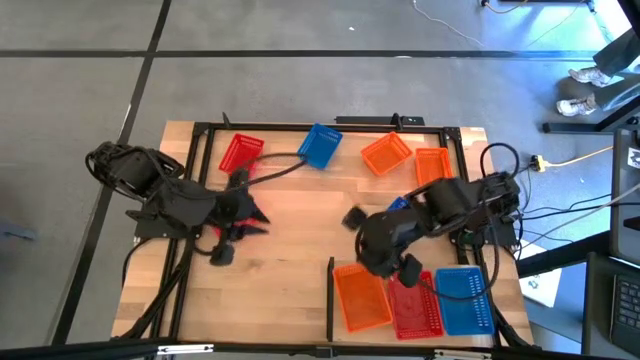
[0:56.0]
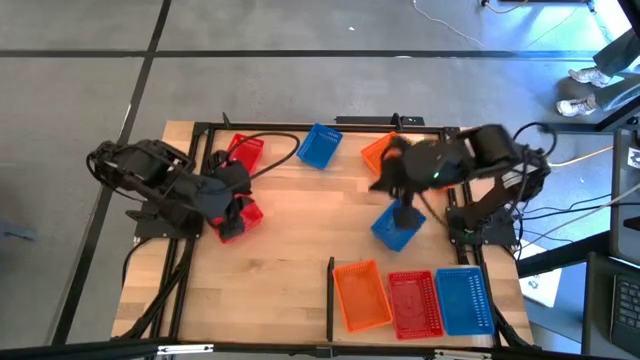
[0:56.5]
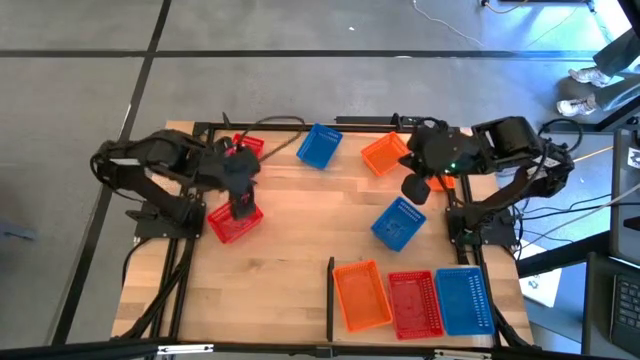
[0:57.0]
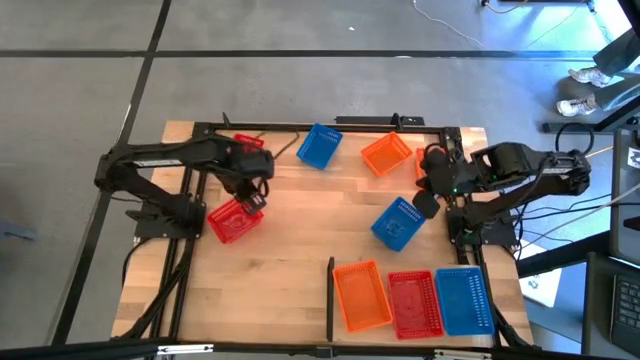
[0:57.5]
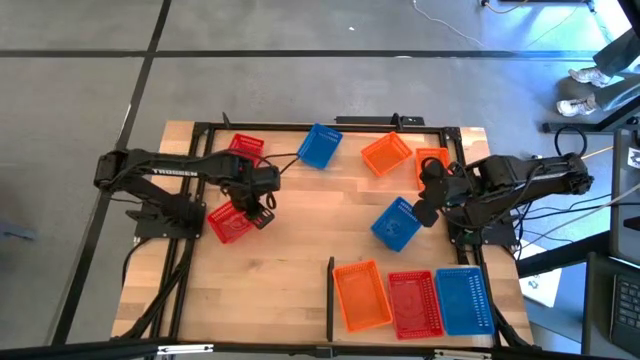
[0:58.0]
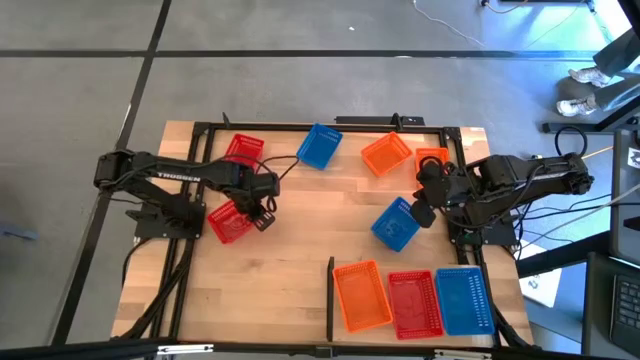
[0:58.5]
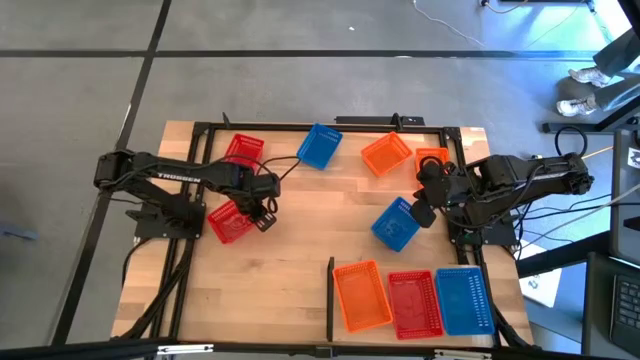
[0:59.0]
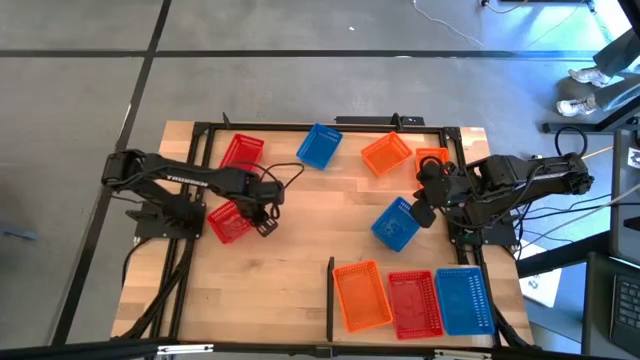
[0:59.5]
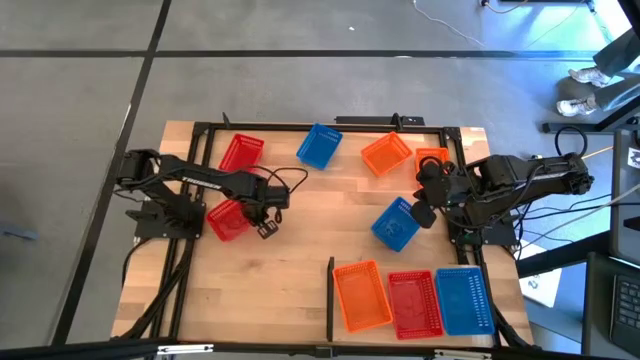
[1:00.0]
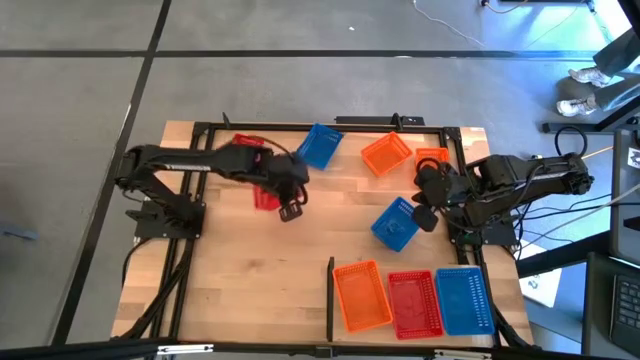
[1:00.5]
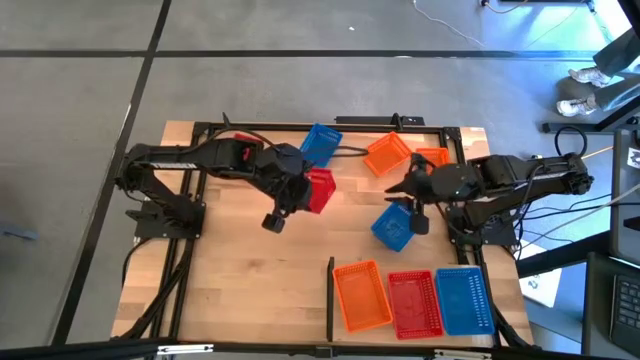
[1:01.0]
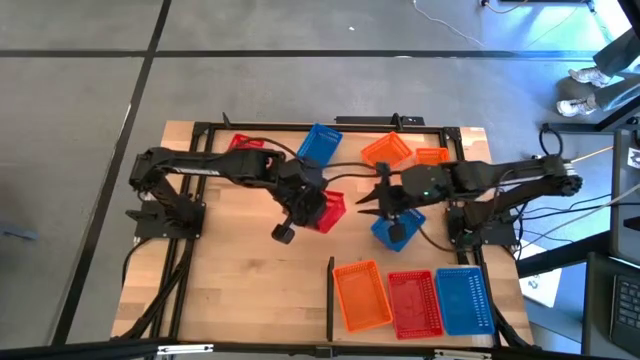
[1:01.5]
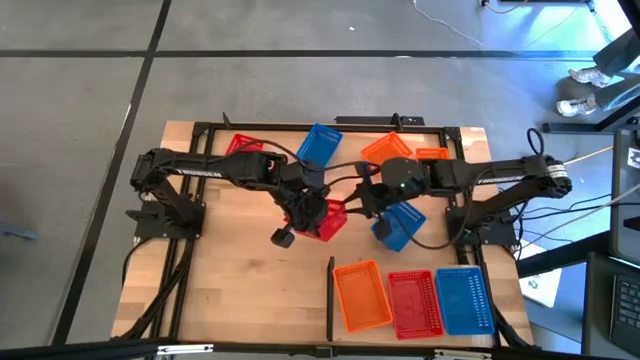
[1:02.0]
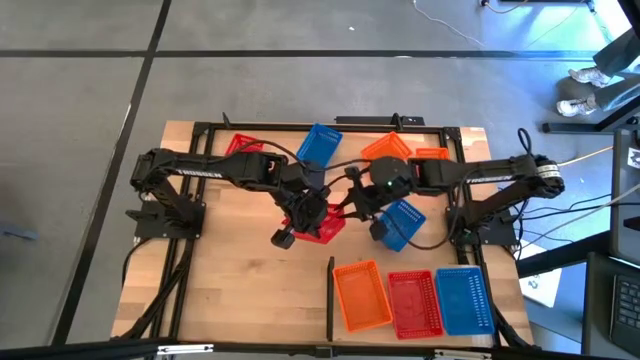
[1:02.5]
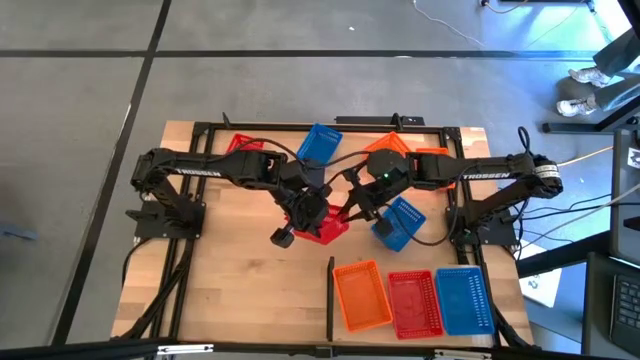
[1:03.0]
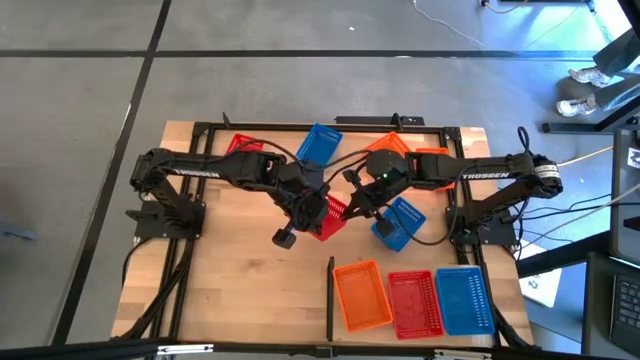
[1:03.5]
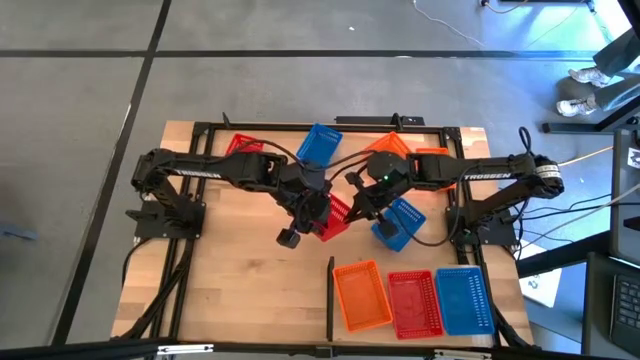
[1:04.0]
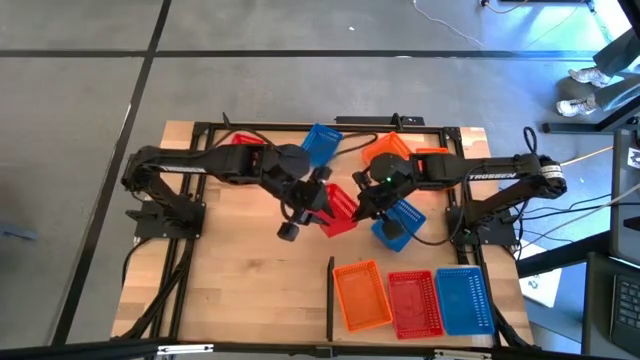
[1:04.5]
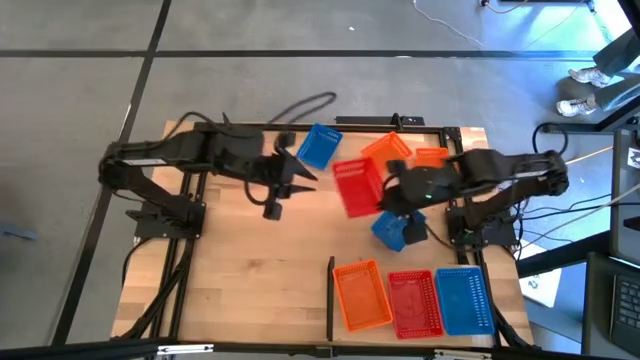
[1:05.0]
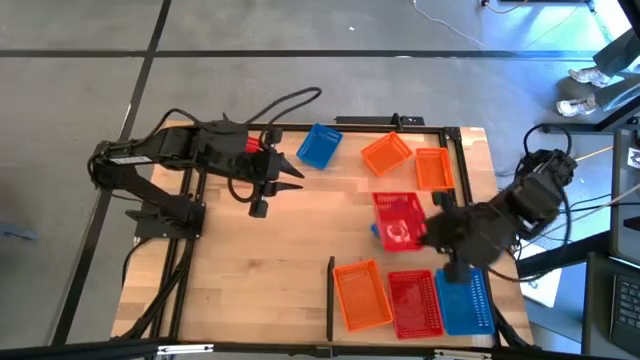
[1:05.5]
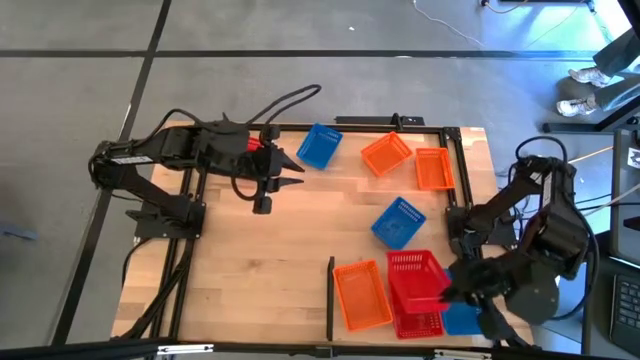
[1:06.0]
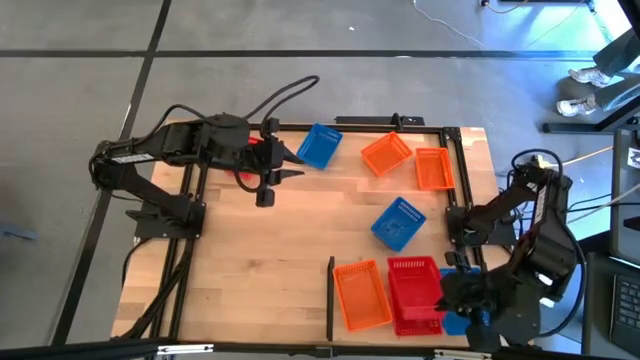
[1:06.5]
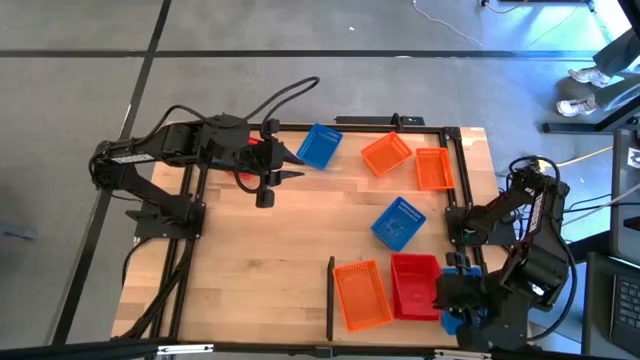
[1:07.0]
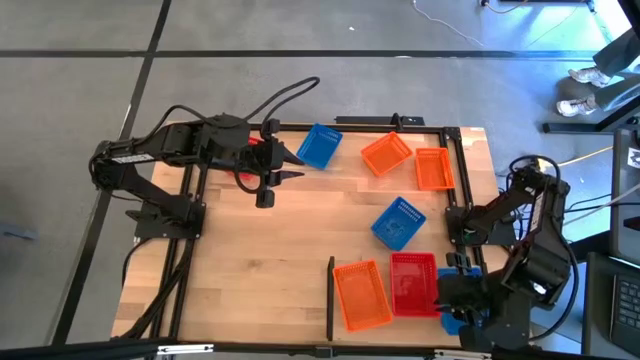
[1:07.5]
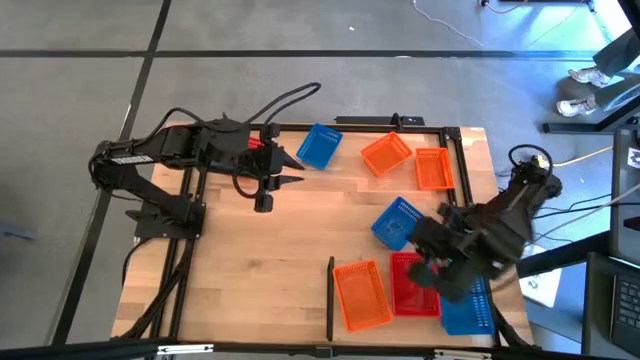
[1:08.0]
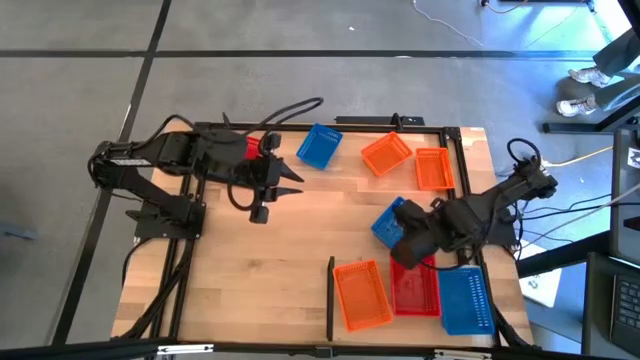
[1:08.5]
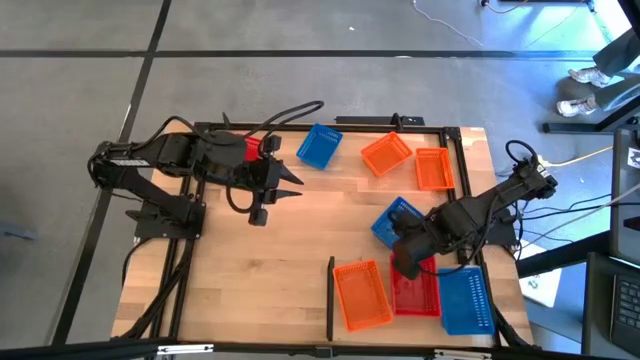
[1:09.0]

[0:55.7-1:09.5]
Task: Stack baskets on shelf by color
Stack the bottom red basket on top of the red basket on the shelf

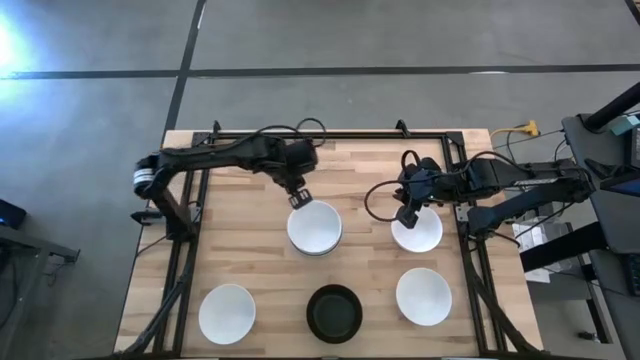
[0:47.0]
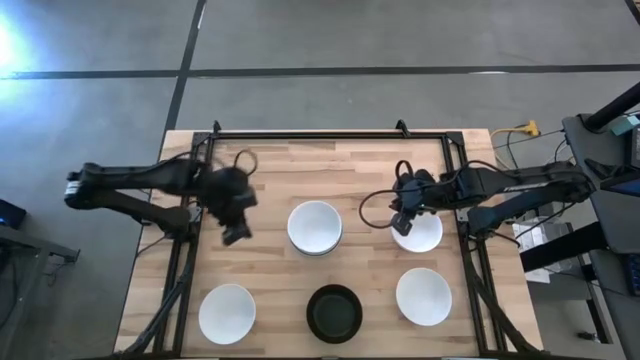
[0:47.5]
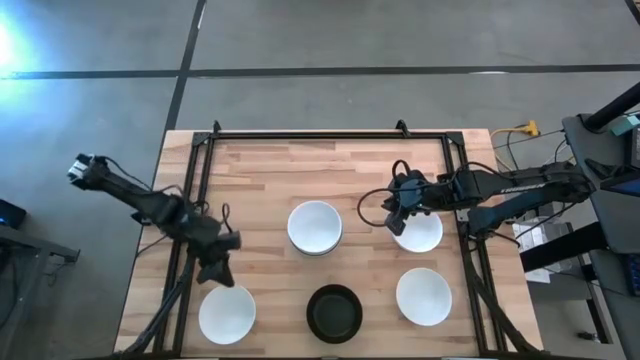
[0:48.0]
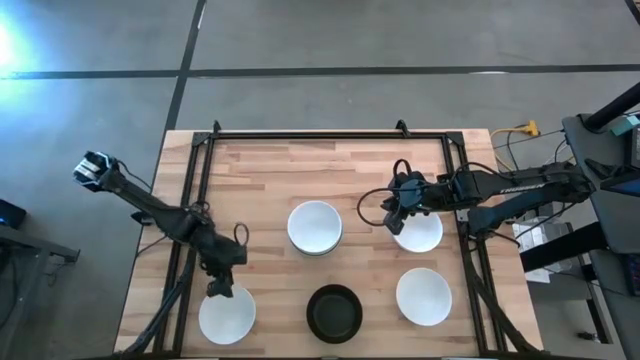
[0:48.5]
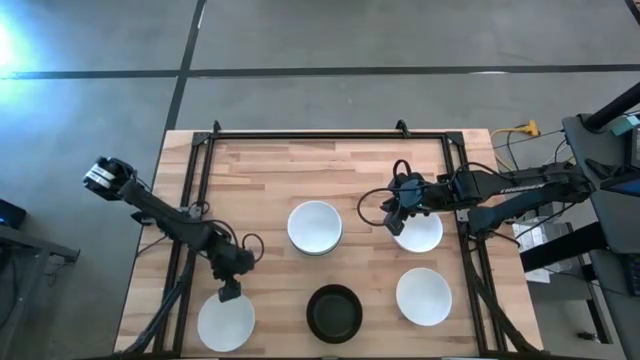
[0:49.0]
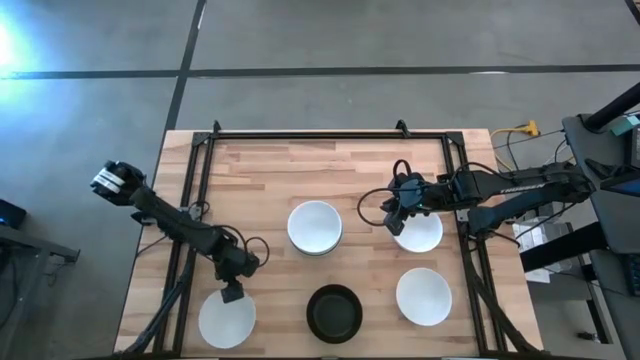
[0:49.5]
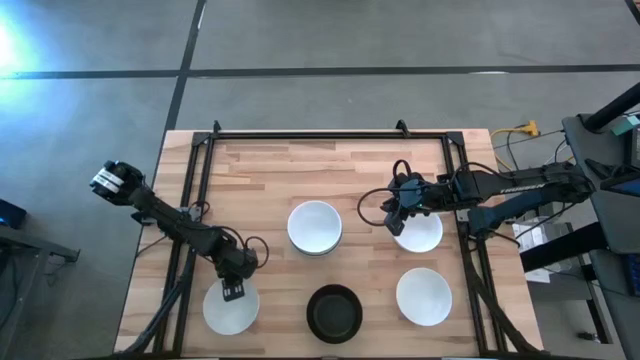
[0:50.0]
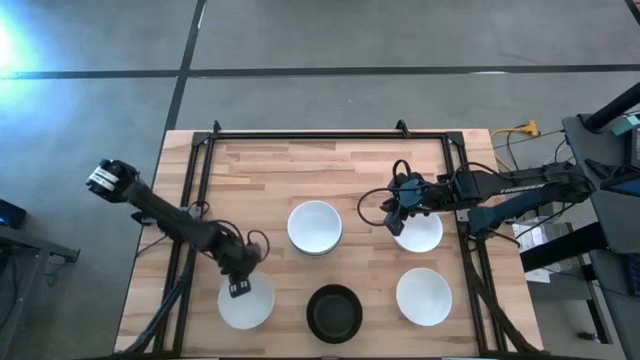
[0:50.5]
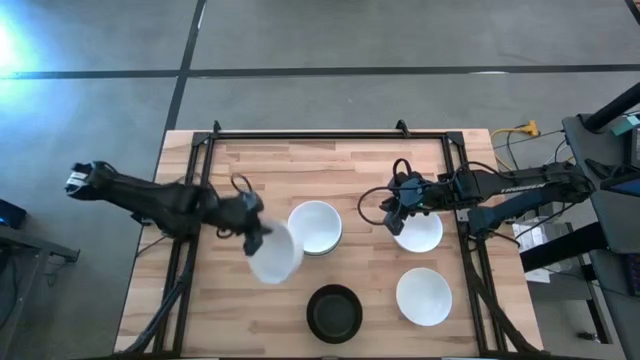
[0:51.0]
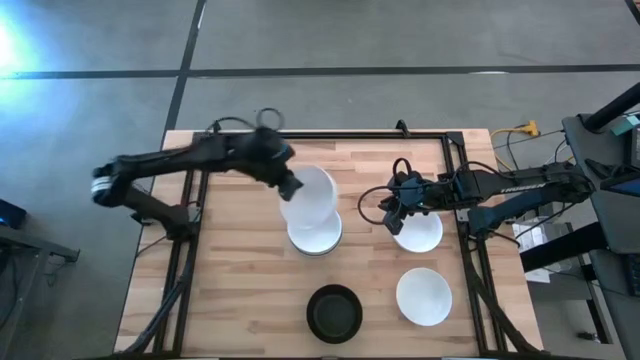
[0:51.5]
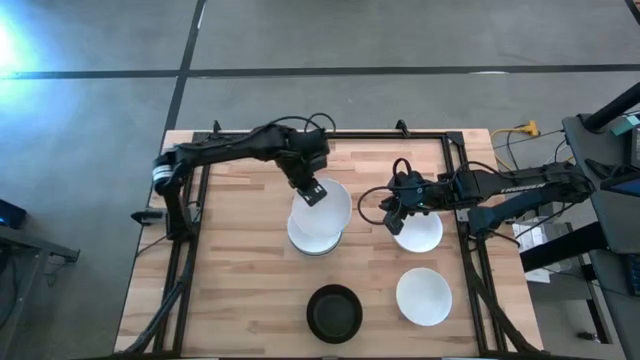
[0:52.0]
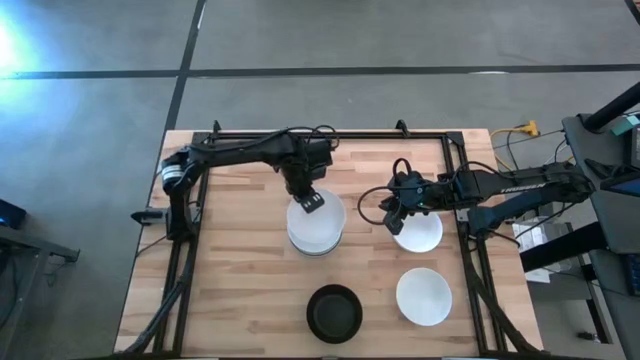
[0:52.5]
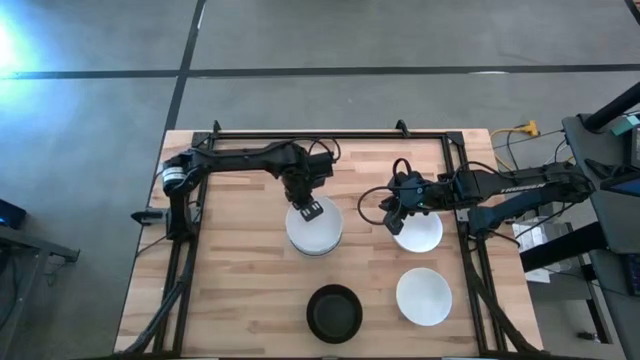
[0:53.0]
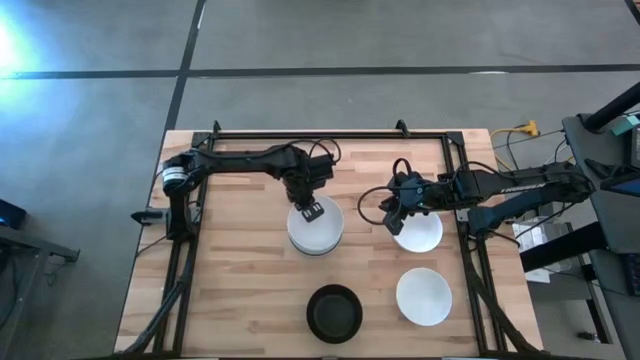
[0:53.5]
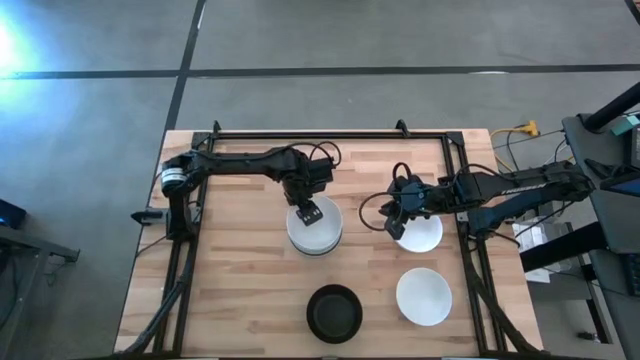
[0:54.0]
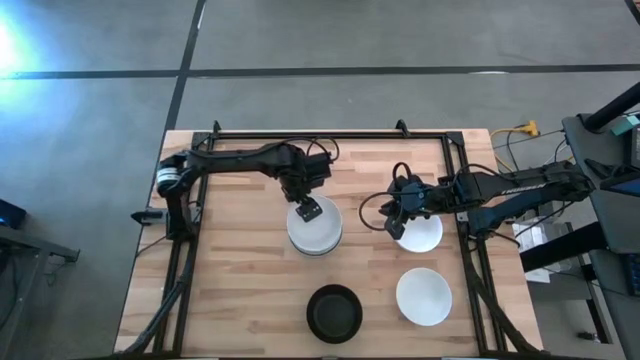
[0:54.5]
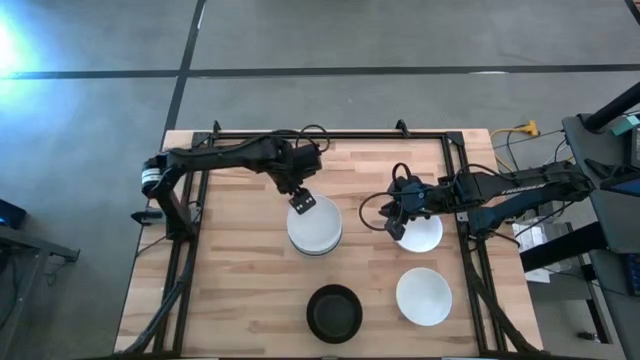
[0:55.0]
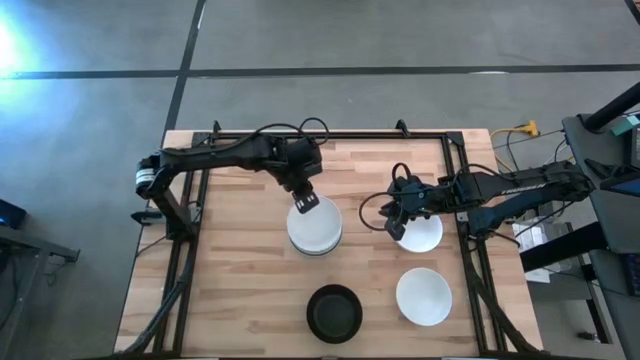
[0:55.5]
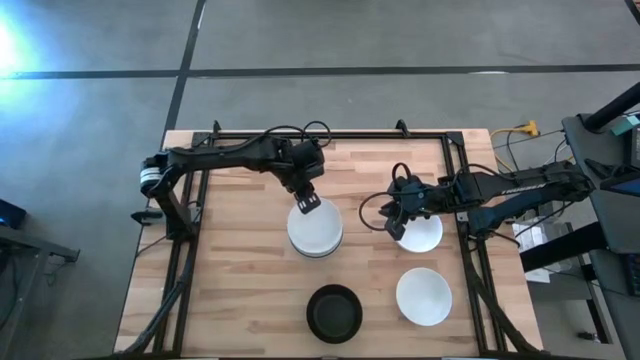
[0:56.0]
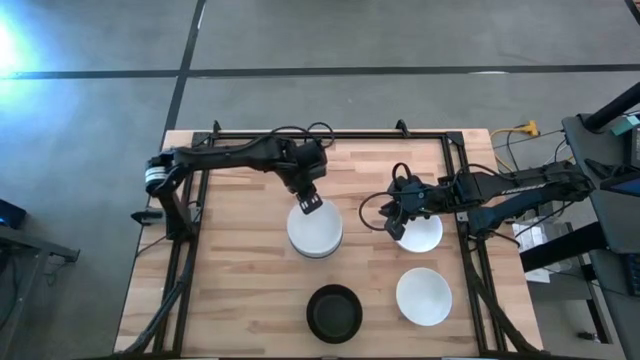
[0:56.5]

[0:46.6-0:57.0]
Task: Nest bowls inside each other
Stack the white bowl on top of the other white bowl
